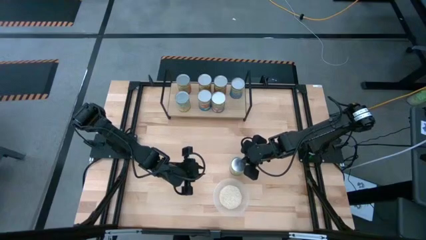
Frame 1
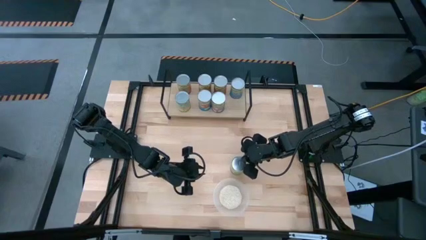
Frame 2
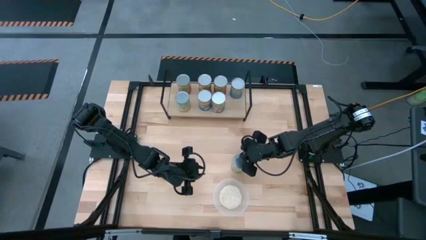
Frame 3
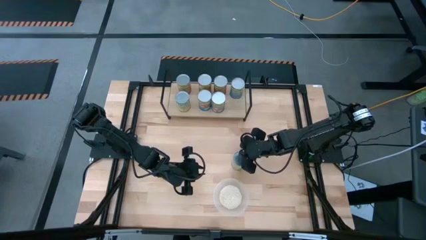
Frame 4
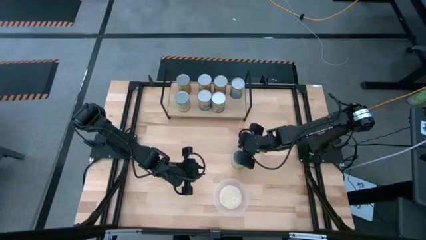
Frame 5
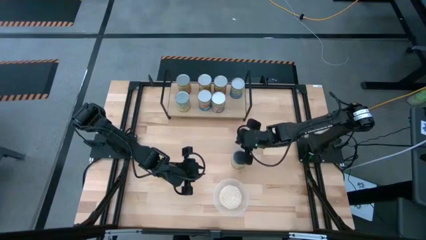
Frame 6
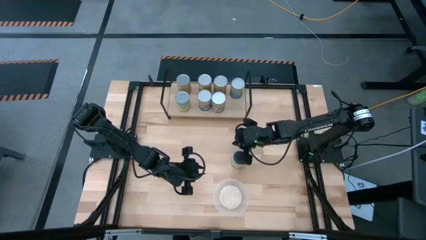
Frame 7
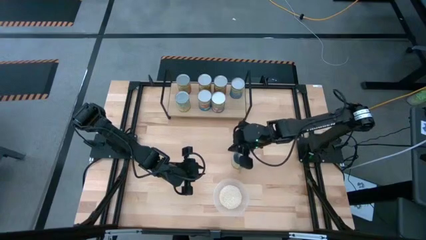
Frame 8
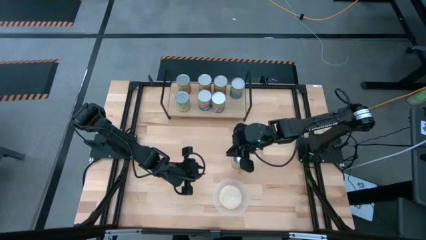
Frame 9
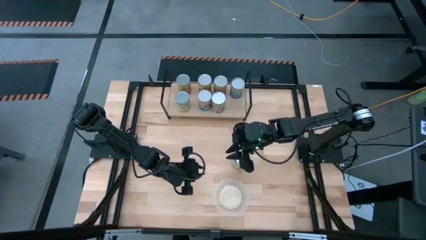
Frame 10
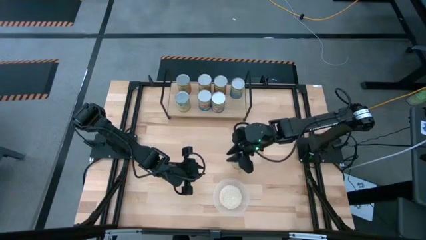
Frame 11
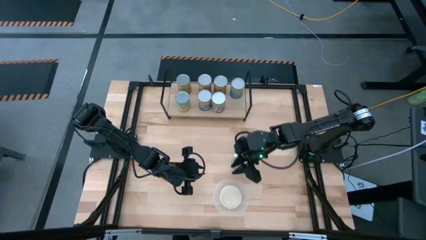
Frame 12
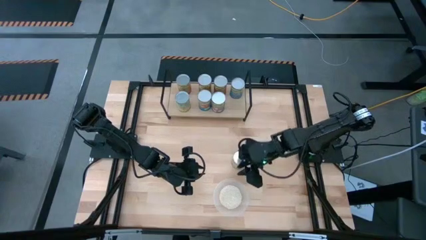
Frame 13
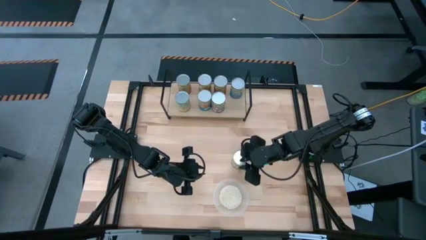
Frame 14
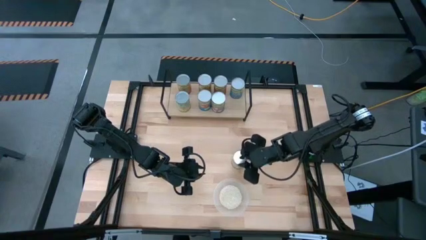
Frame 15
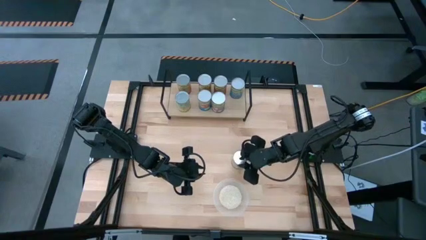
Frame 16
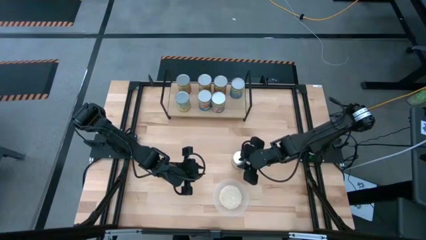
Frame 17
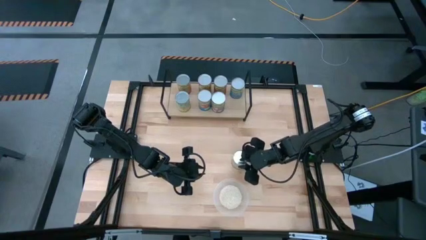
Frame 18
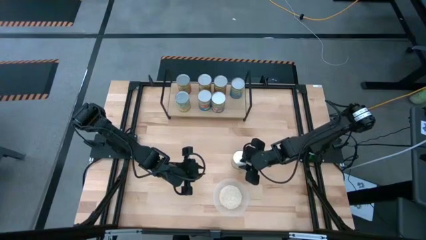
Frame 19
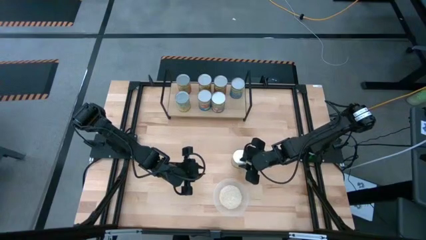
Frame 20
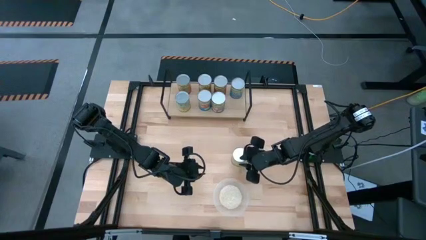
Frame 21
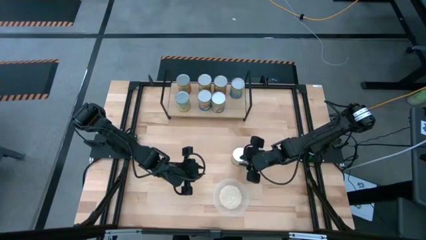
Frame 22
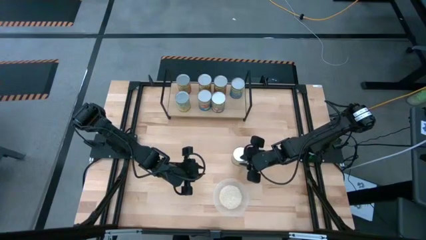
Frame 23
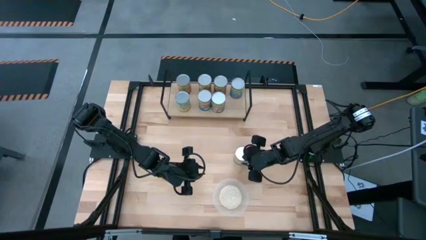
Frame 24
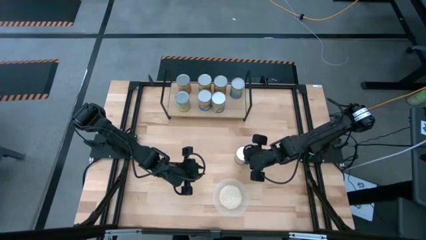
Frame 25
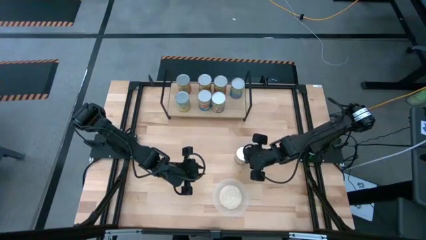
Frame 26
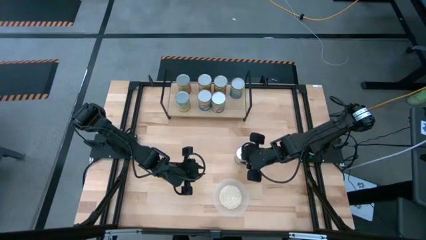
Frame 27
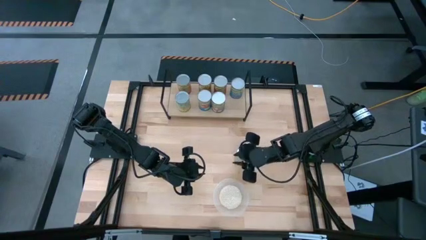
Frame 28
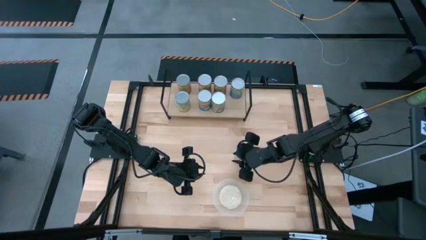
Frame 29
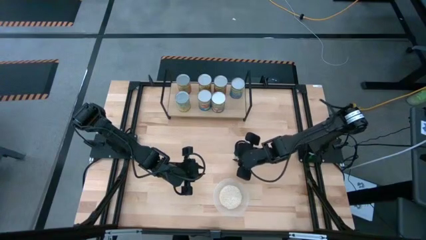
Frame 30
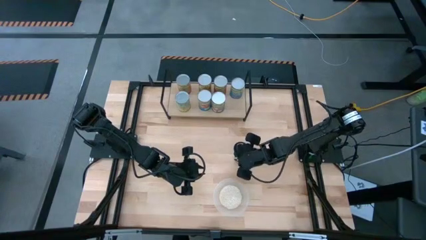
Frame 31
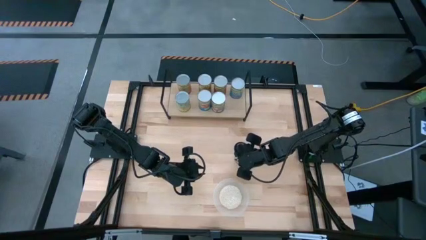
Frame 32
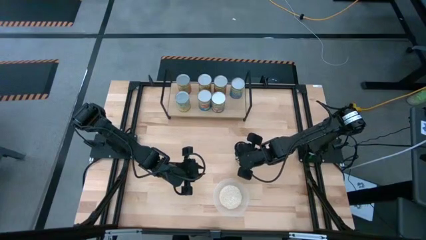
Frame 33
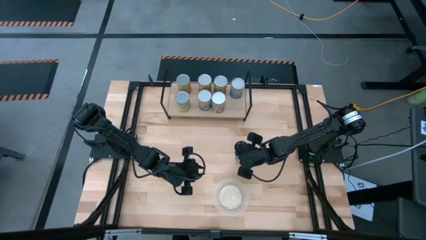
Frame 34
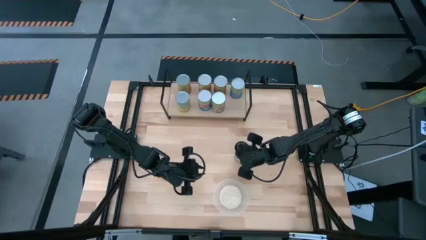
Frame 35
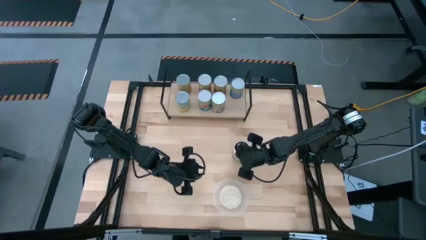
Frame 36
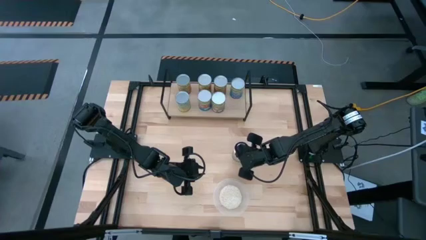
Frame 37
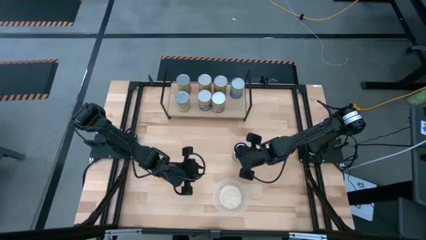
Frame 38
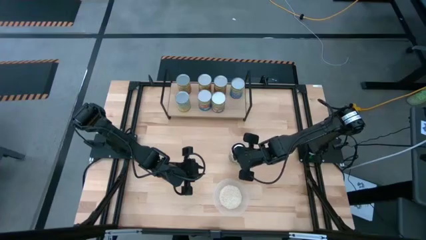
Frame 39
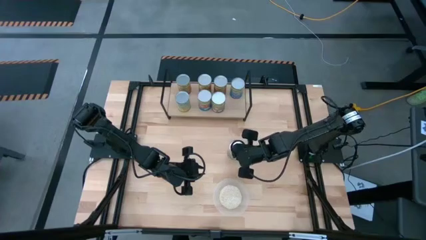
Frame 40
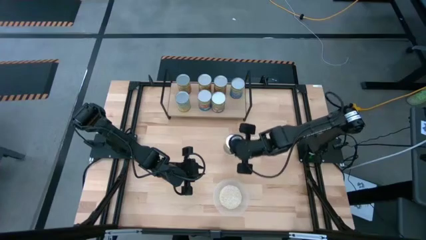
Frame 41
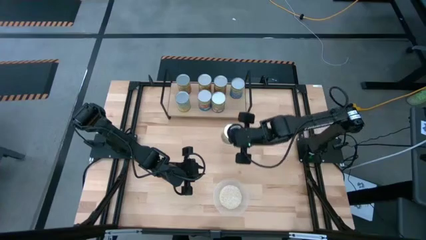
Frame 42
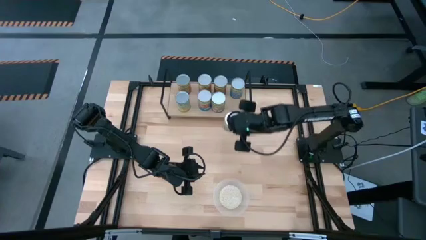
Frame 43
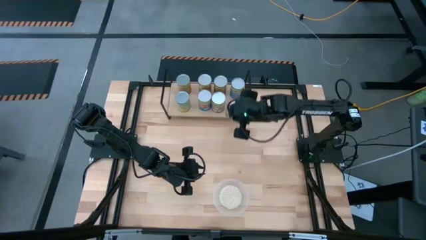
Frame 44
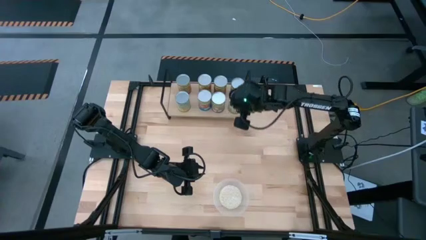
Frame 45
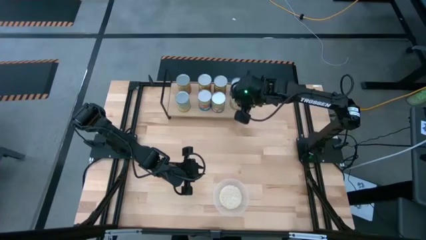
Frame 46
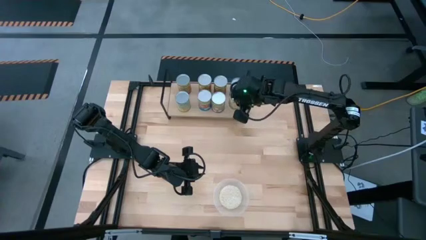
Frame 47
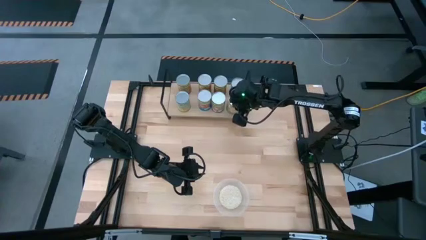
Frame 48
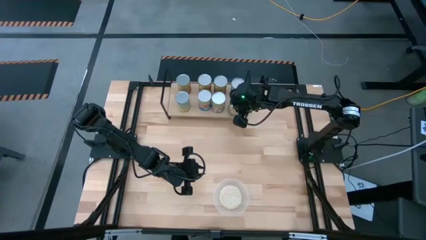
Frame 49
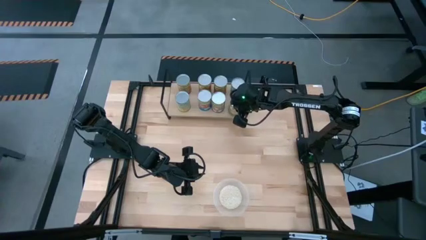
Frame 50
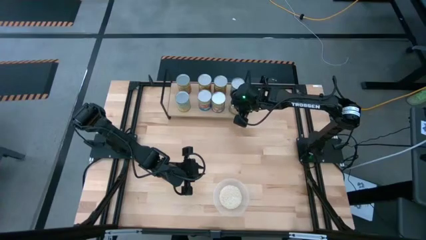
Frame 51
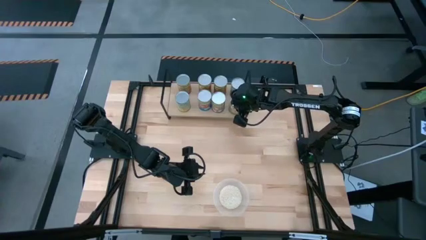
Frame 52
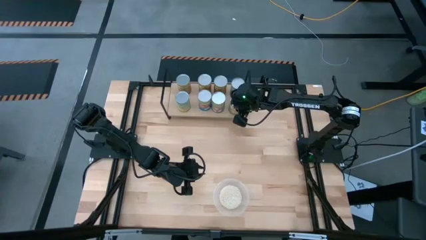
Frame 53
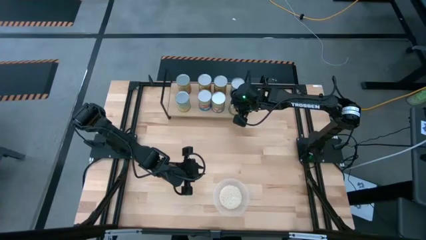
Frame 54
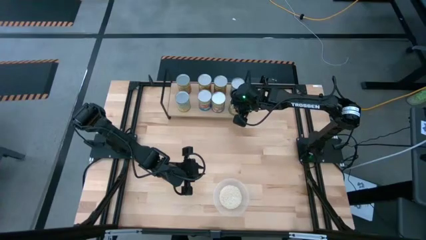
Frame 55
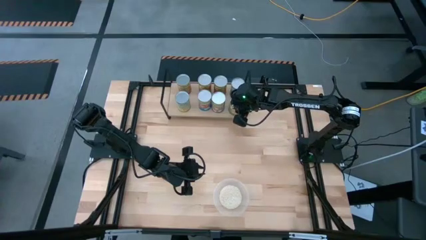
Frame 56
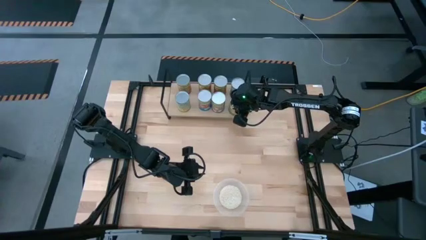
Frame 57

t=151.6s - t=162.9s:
Task: Pick and place cans onto a shelf
Put the canned oranges on the shelf

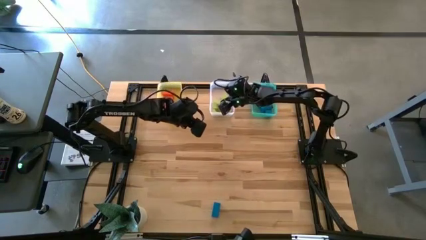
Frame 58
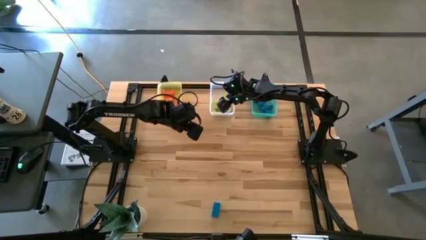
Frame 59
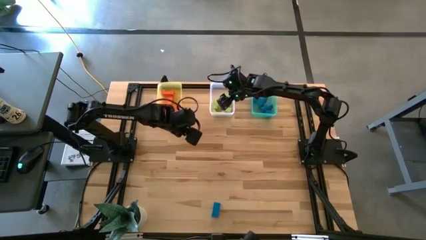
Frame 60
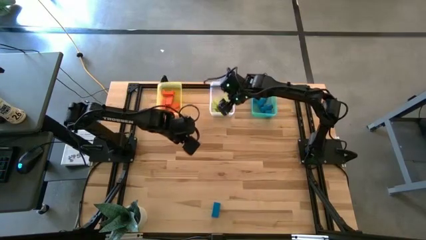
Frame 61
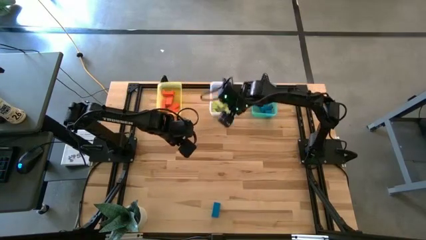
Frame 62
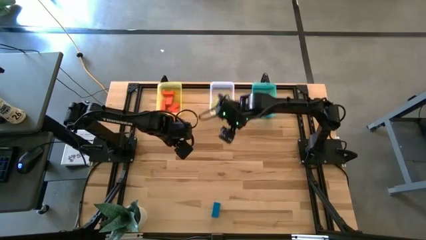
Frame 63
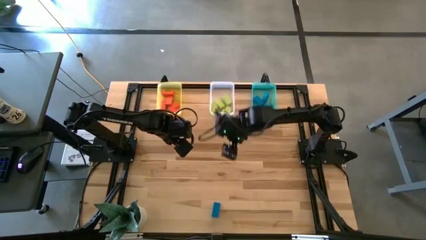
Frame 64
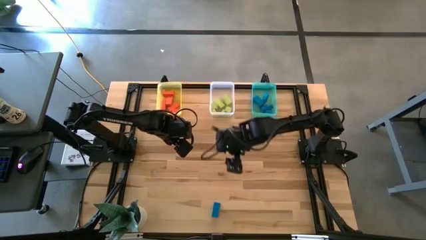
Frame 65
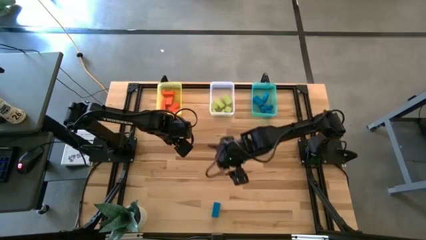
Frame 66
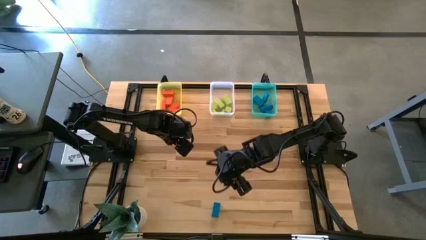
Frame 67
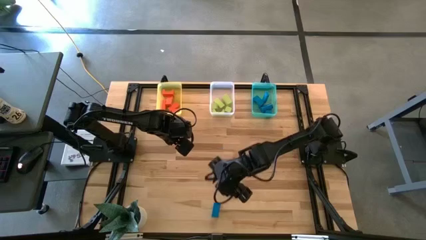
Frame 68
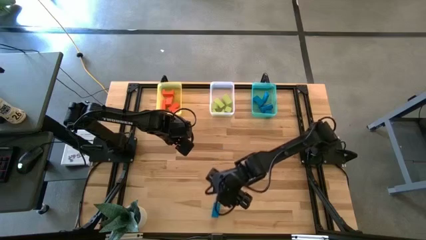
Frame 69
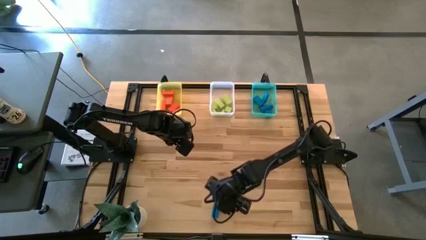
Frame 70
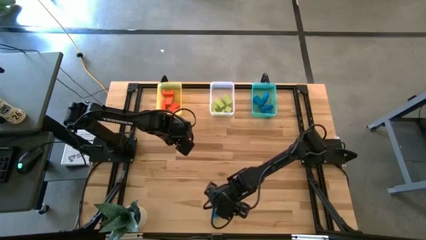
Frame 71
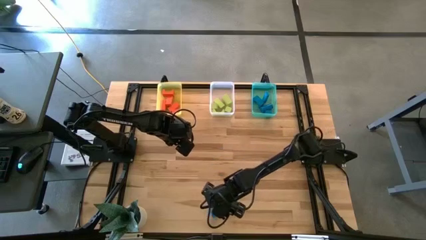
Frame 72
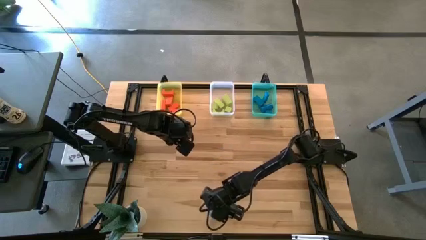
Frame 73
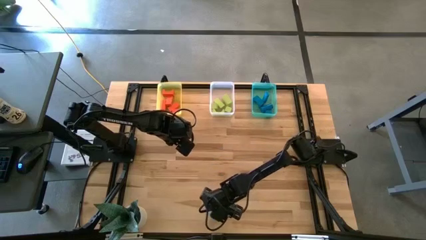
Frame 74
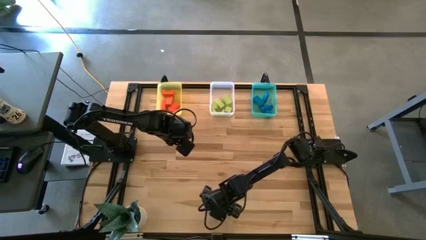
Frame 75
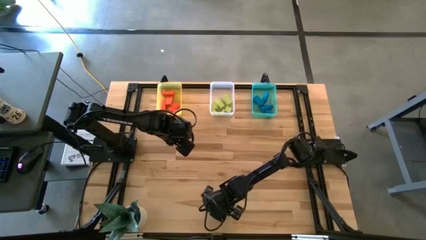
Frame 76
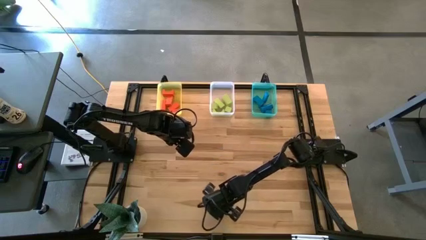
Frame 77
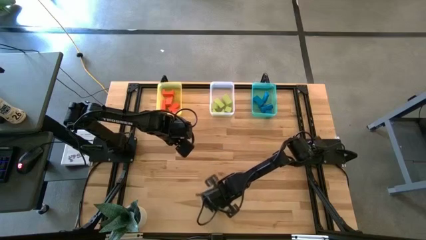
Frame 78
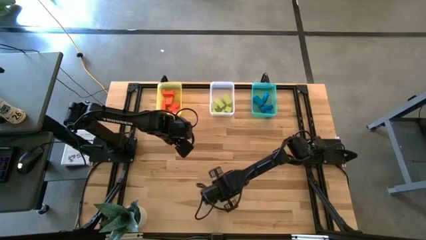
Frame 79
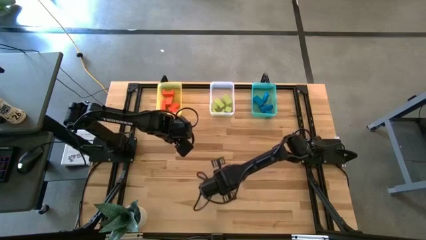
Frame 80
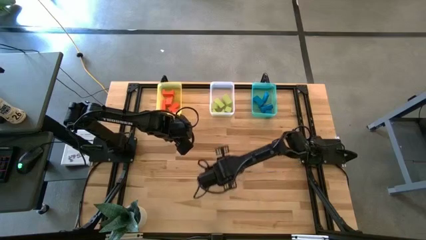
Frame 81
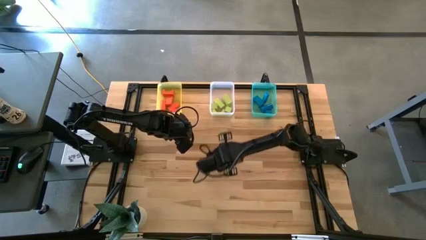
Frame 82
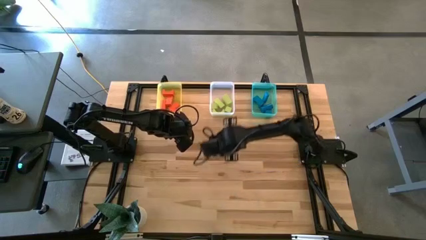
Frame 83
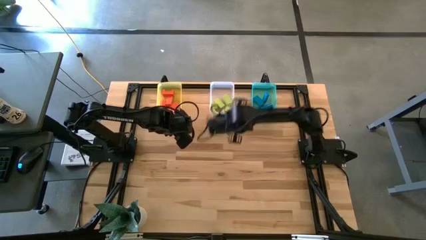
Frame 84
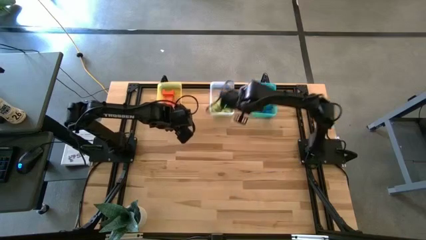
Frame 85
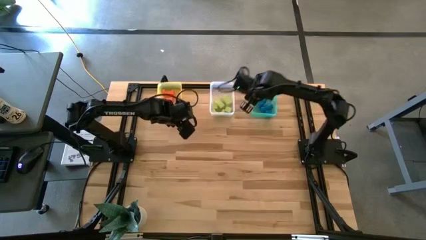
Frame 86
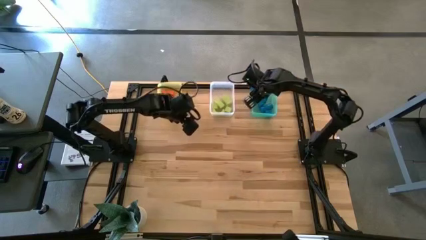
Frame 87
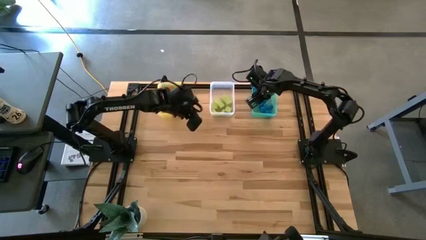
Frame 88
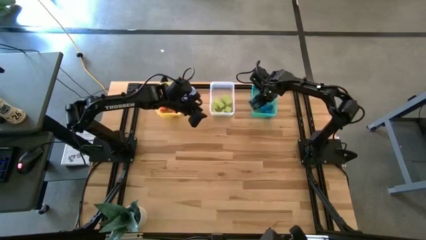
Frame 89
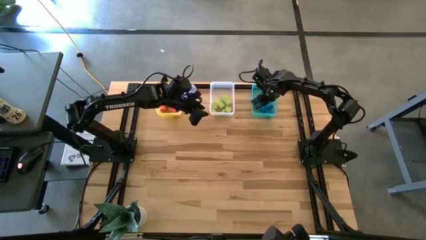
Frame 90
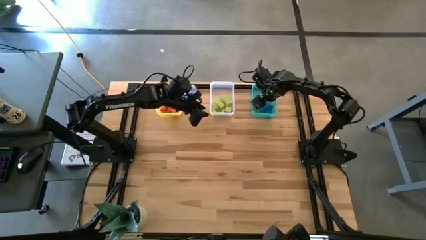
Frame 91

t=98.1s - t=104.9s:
Task: Sort & place blocks by color
Put the blue block into the green bin
